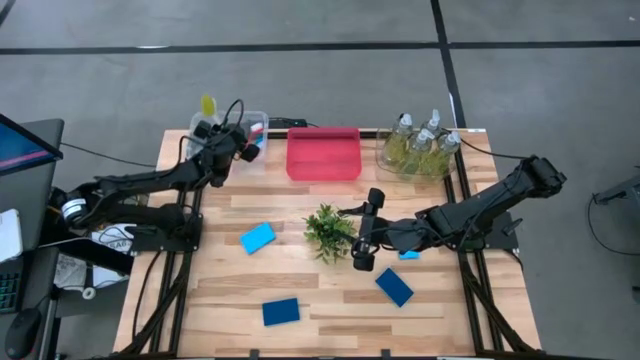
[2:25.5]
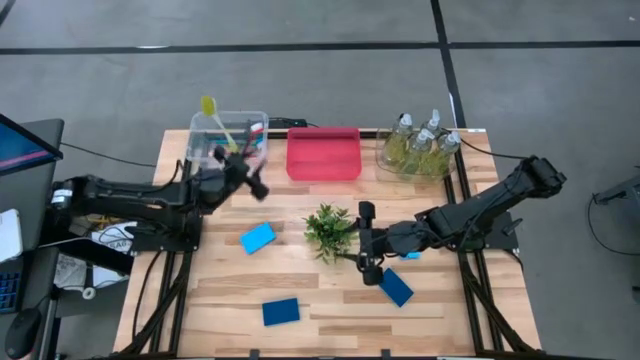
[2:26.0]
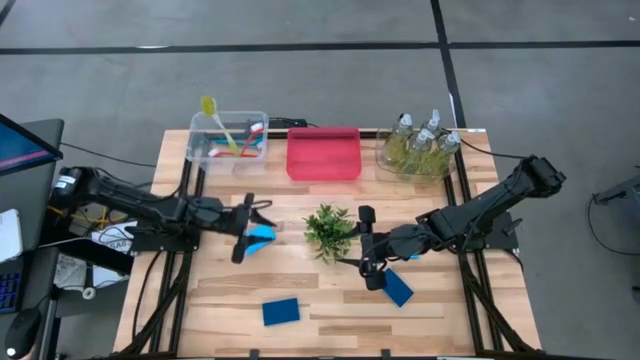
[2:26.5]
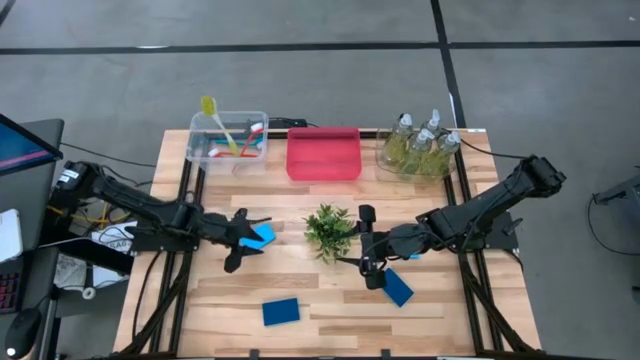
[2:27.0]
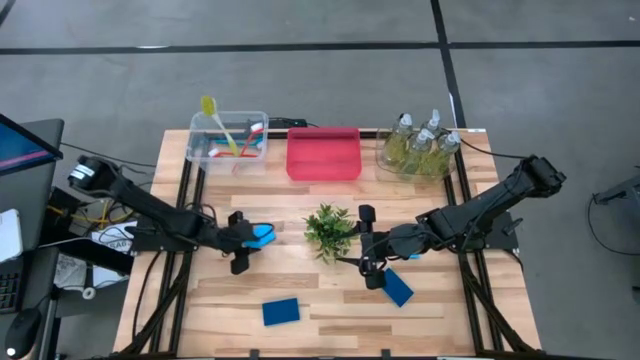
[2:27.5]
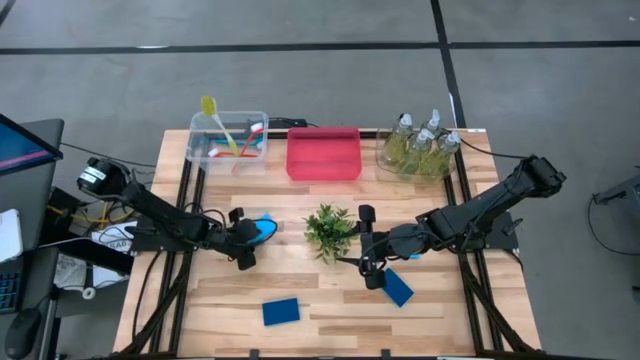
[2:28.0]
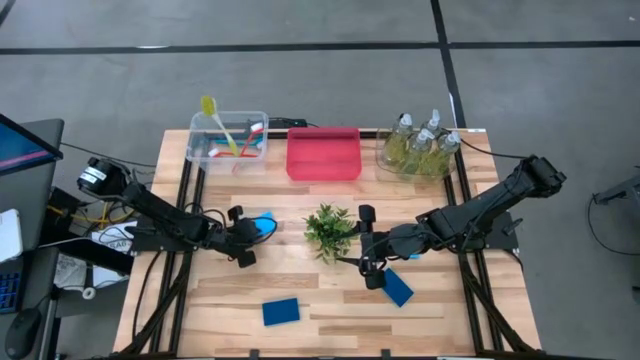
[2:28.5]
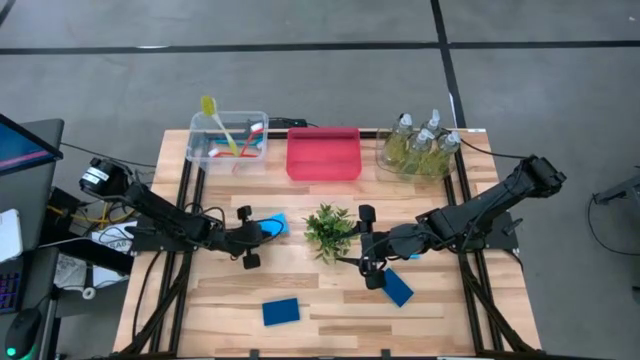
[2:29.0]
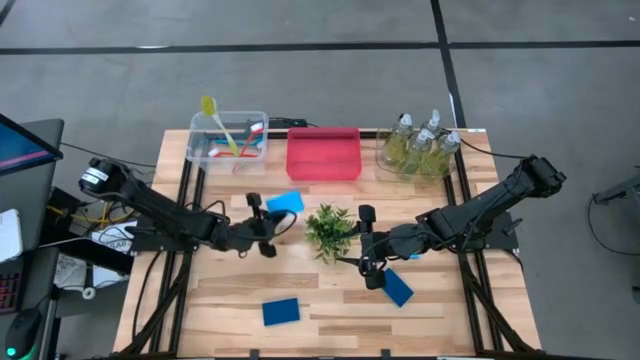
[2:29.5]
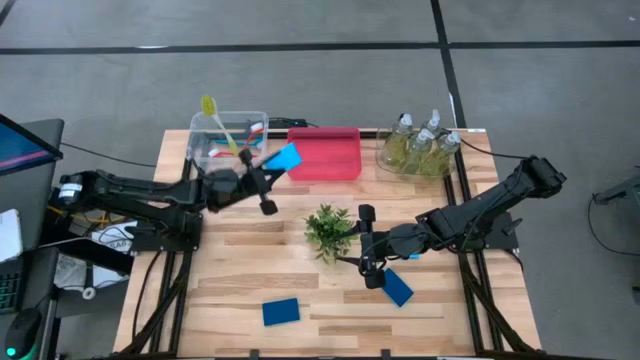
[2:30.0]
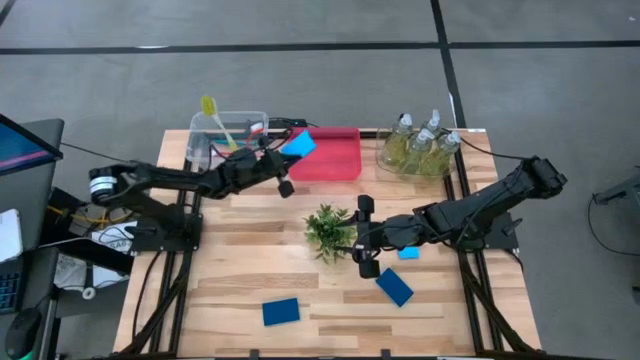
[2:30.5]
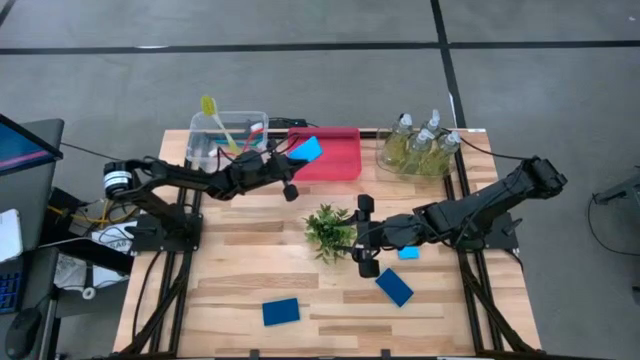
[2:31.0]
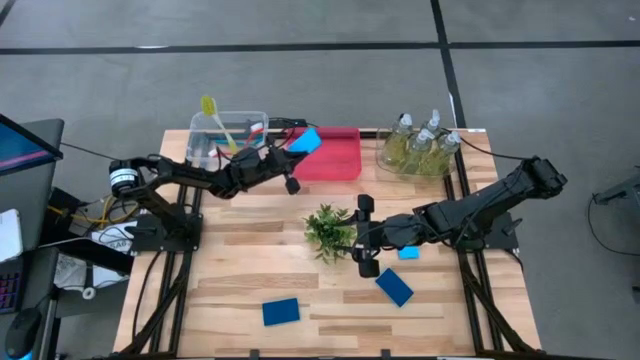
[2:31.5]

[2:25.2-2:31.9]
Task: Pick & Place Kitchen Sink Supplies
Put the blue sponge into the red bin

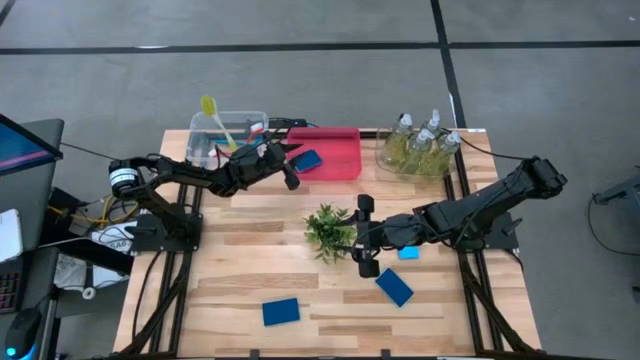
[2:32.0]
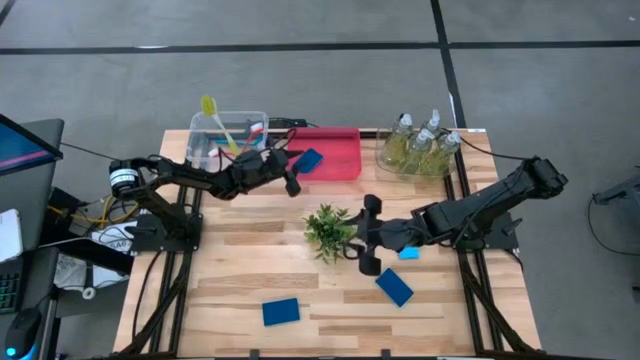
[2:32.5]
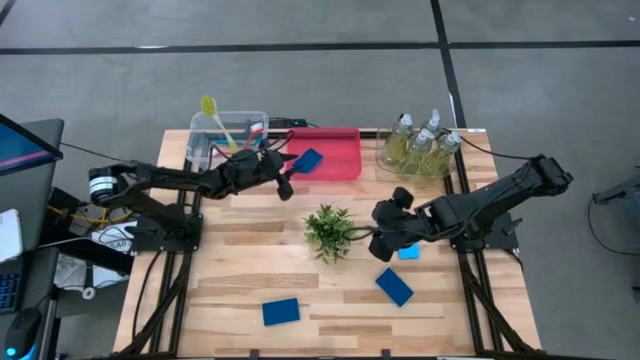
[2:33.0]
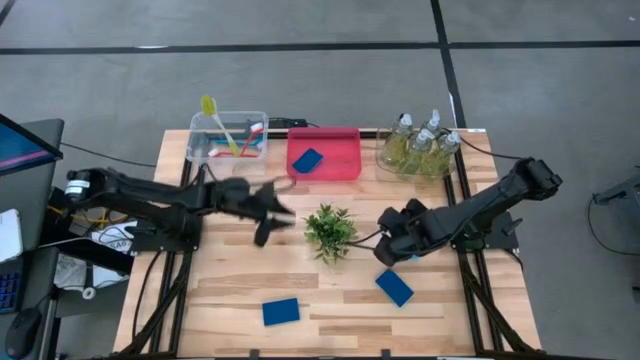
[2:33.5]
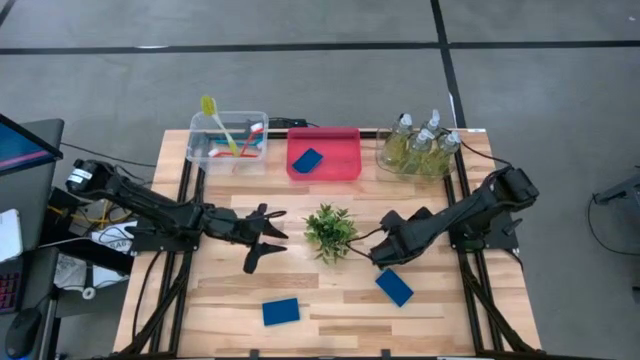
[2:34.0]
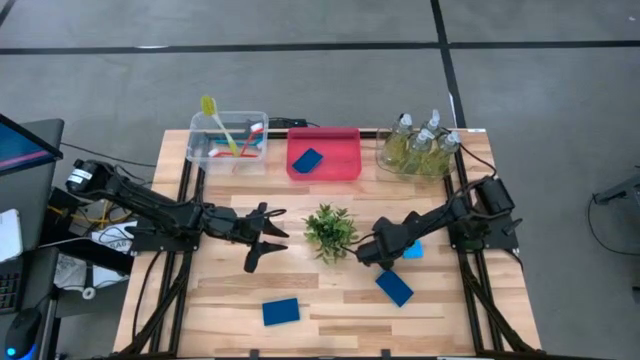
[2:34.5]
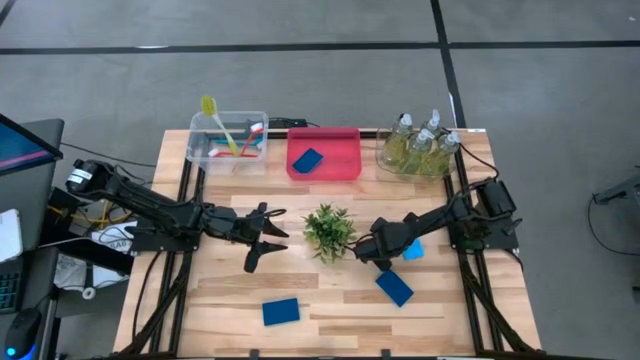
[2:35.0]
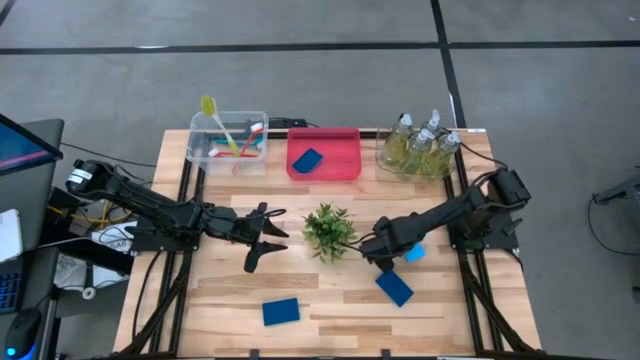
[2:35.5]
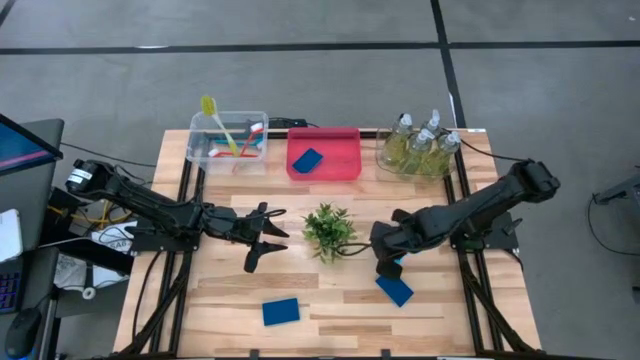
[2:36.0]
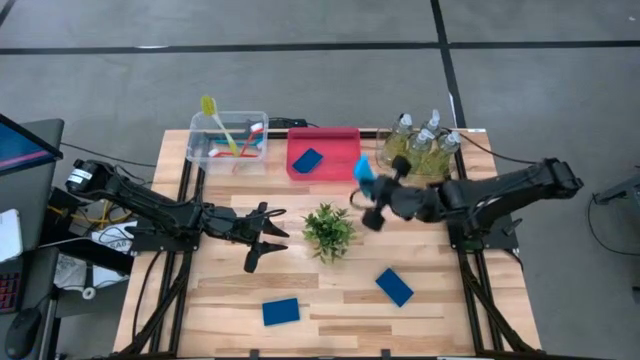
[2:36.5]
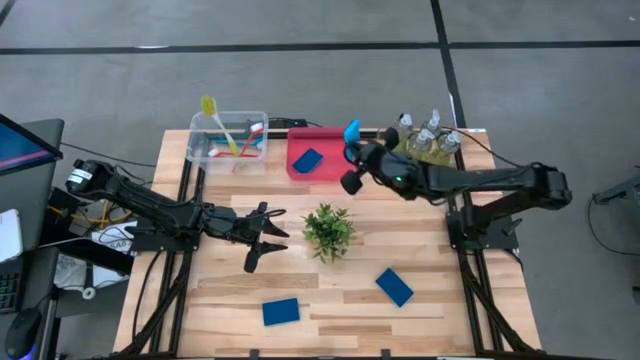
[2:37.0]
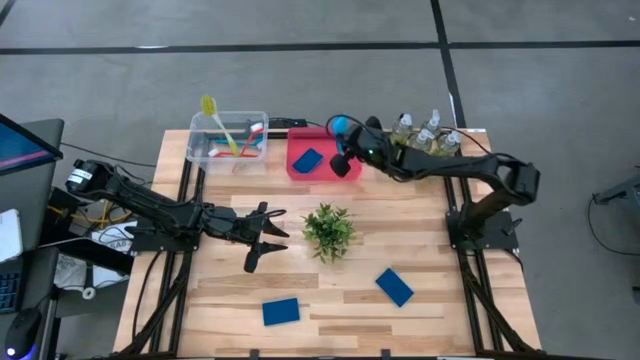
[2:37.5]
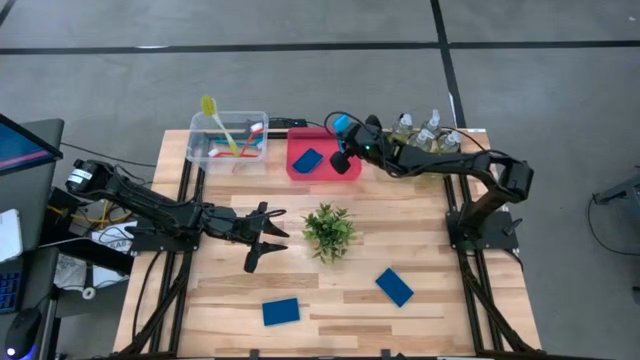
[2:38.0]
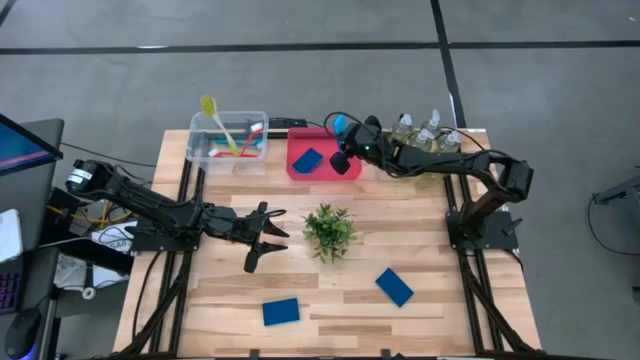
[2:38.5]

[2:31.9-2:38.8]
Put the blue sponge into the red bin

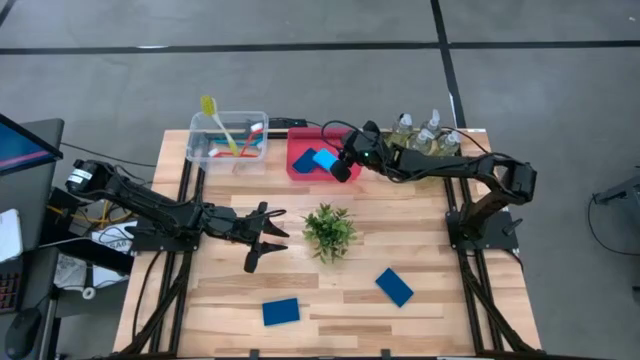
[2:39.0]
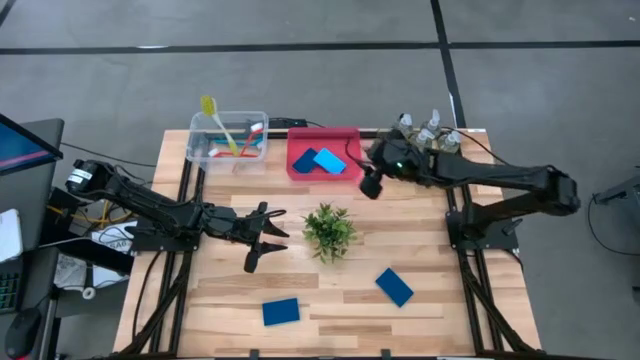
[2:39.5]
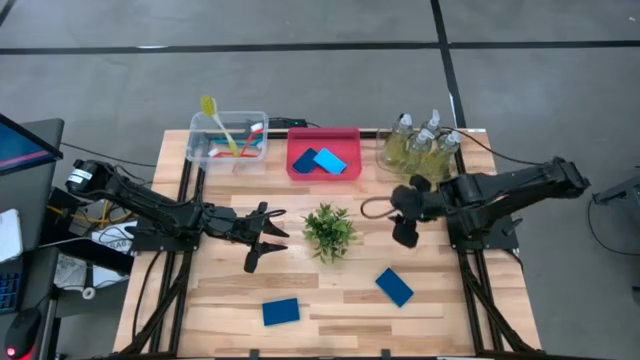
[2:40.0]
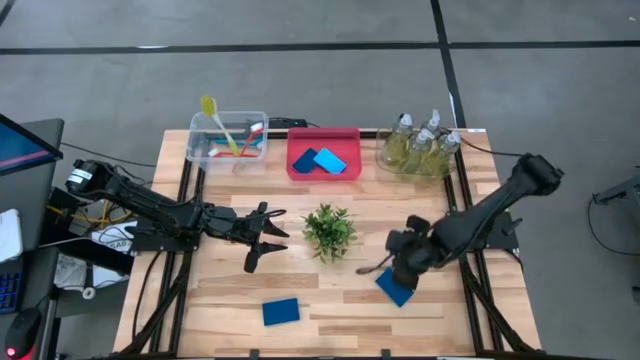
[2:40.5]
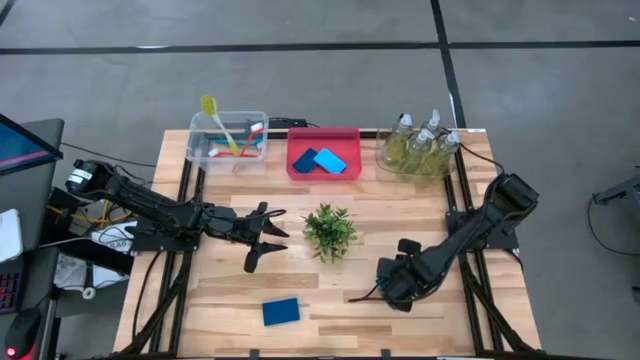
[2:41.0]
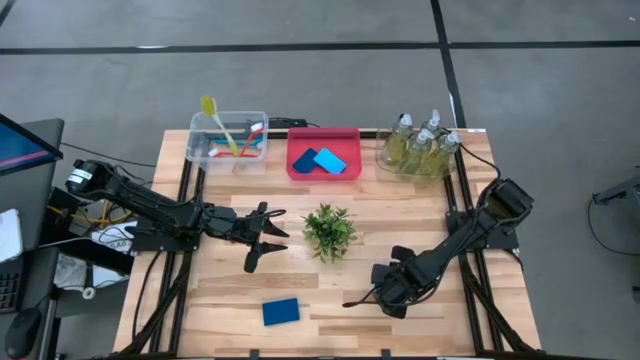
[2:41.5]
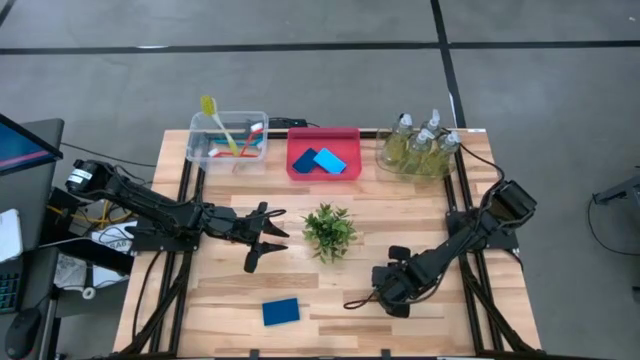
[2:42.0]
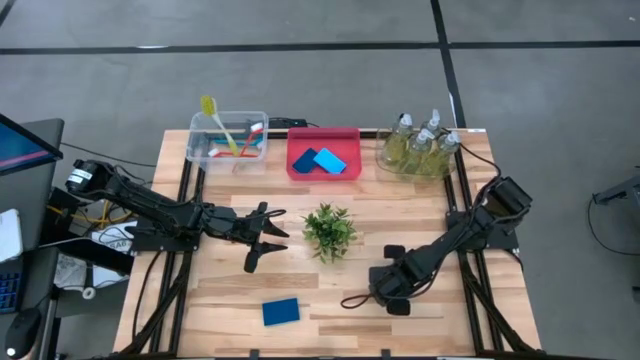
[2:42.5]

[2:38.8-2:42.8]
Put the blue sponge into the red bin

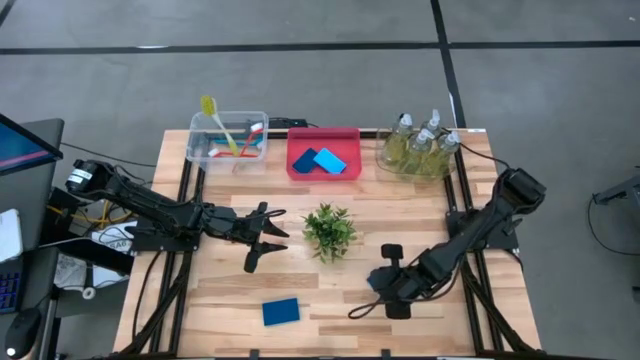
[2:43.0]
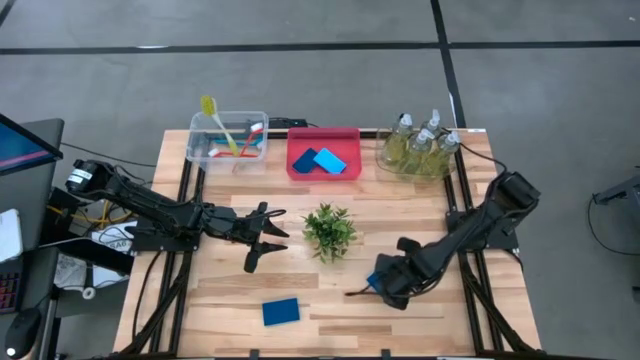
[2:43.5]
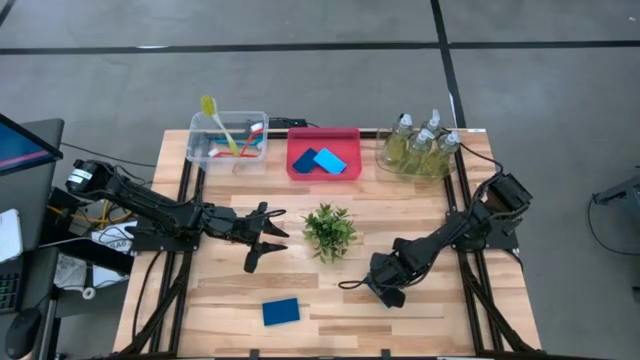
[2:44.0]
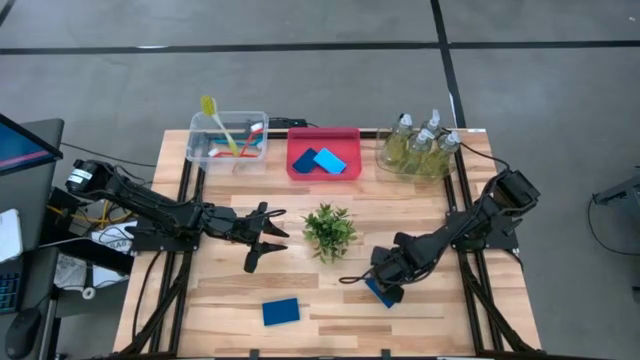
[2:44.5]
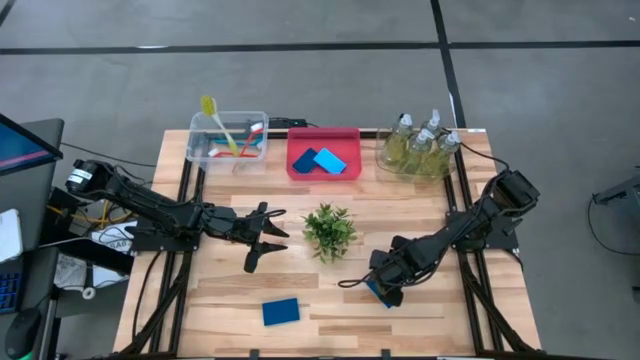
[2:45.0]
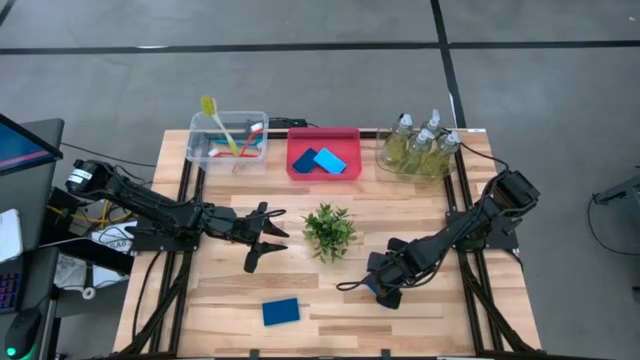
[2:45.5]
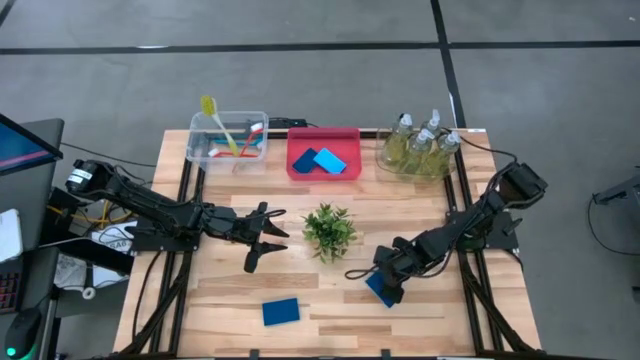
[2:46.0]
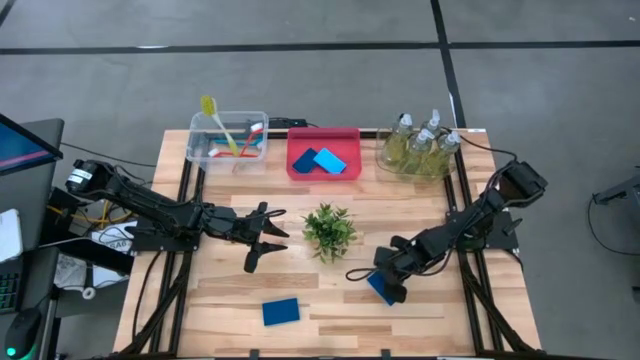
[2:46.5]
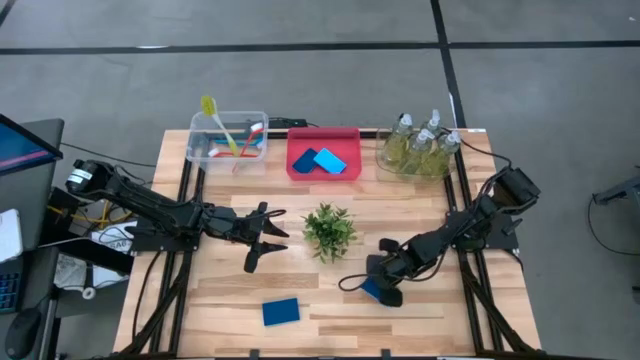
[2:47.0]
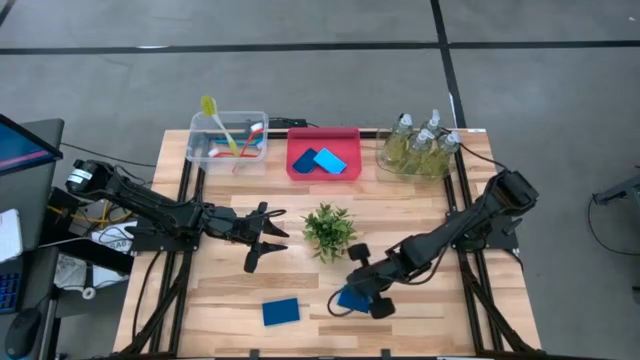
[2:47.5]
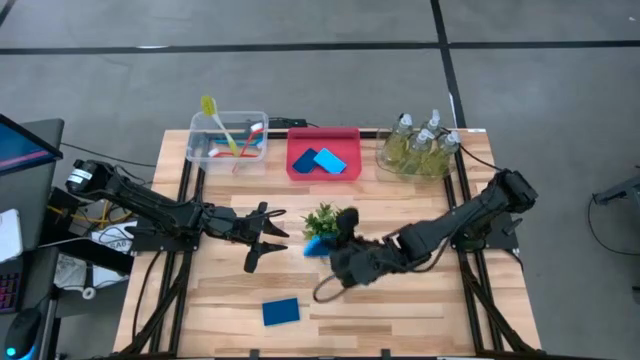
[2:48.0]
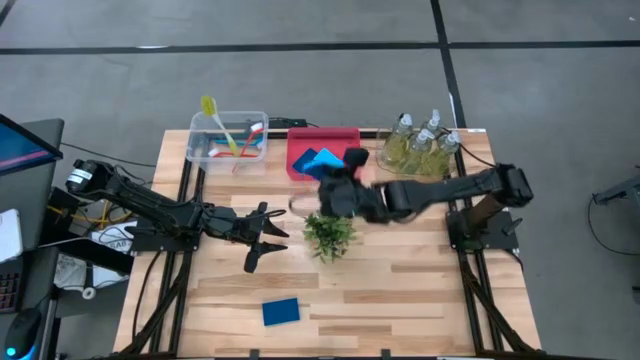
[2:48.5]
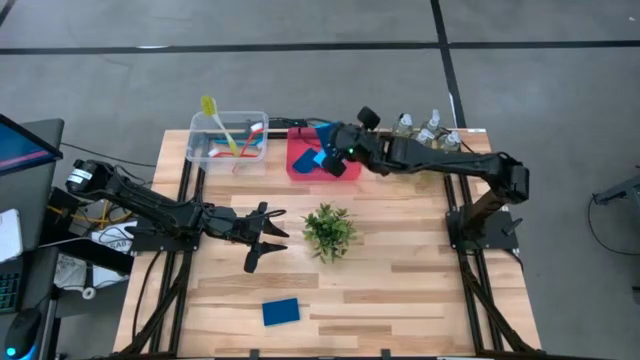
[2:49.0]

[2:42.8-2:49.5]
Put the blue sponge into the red bin
